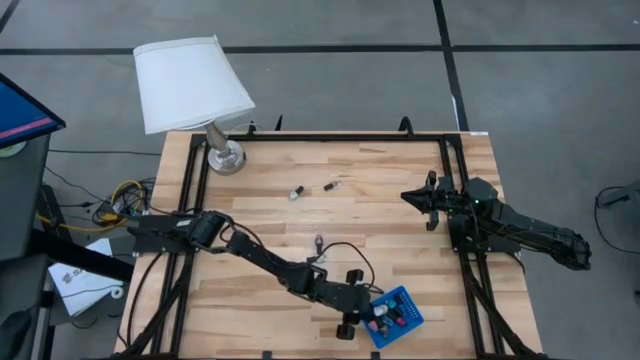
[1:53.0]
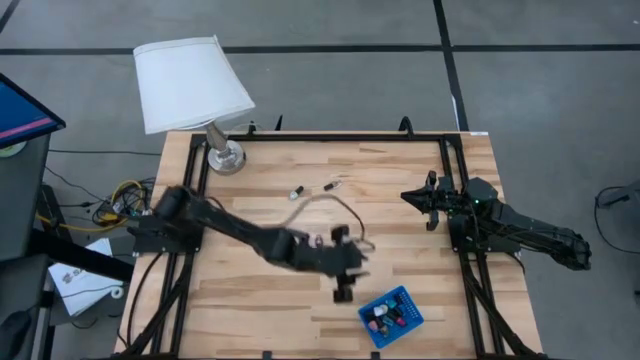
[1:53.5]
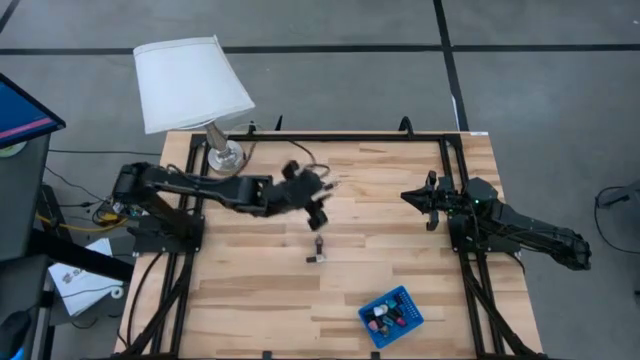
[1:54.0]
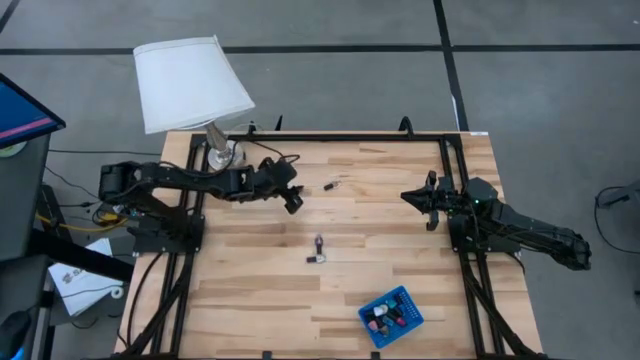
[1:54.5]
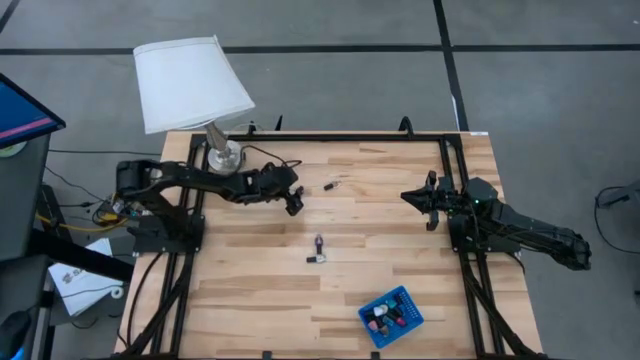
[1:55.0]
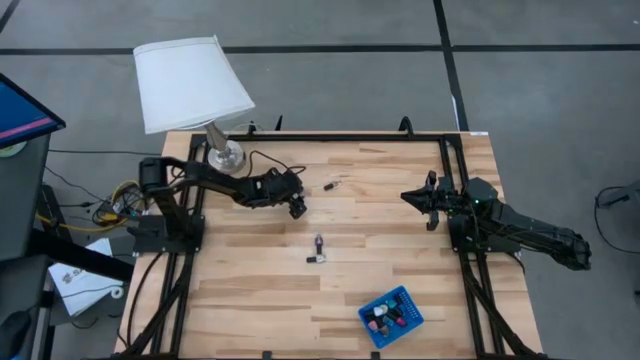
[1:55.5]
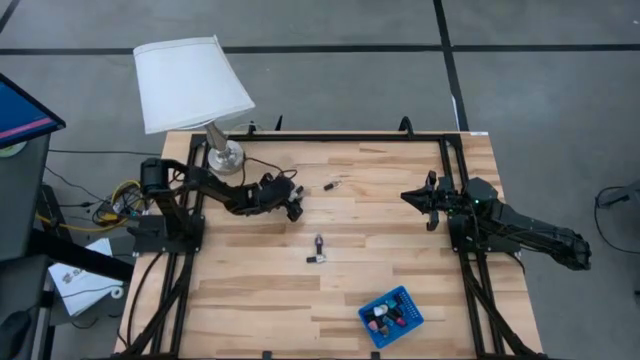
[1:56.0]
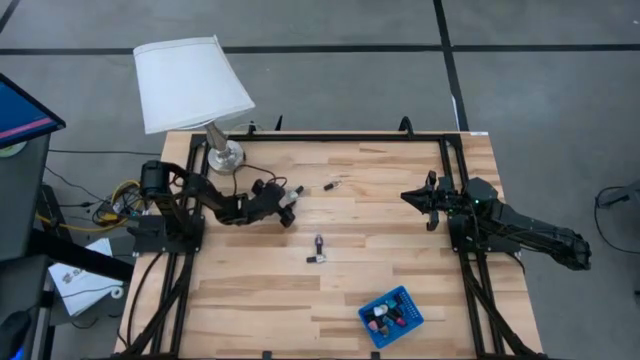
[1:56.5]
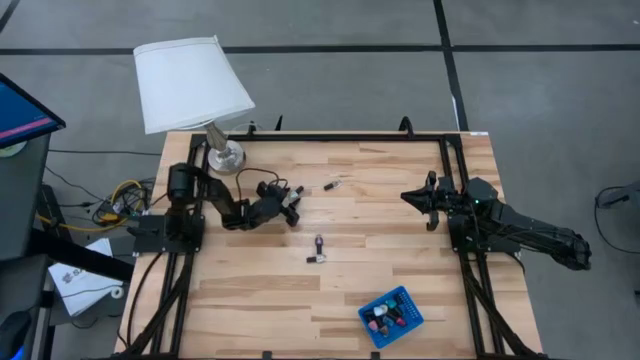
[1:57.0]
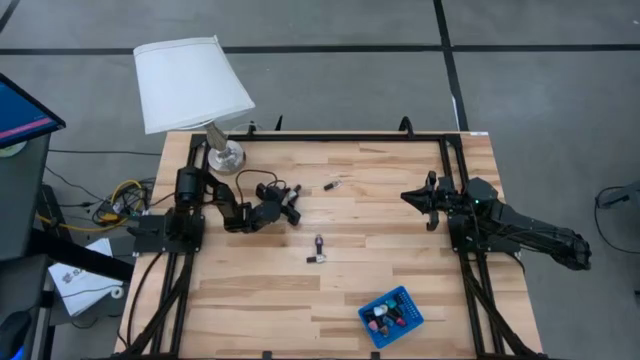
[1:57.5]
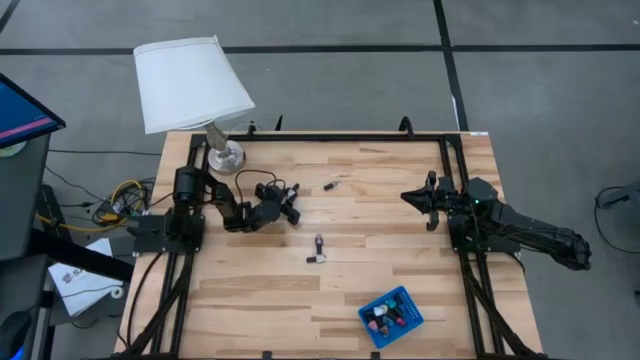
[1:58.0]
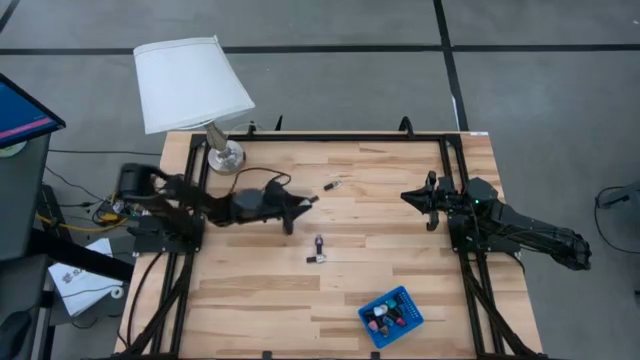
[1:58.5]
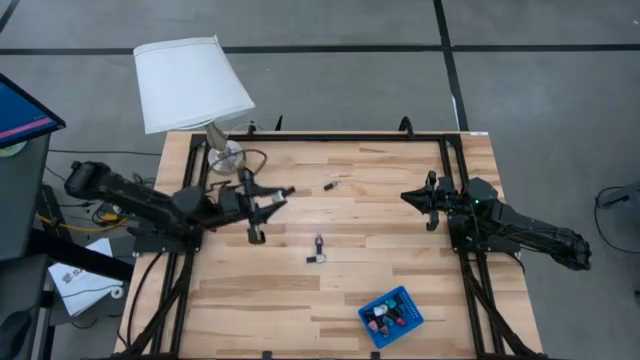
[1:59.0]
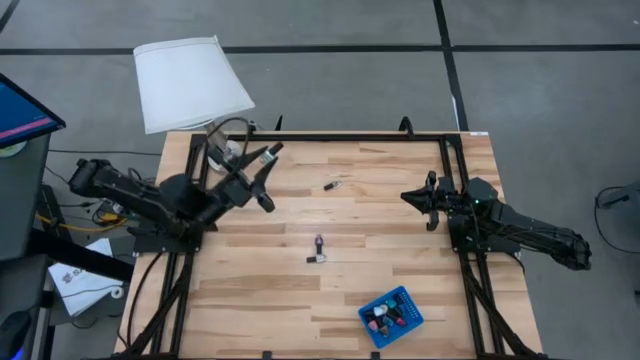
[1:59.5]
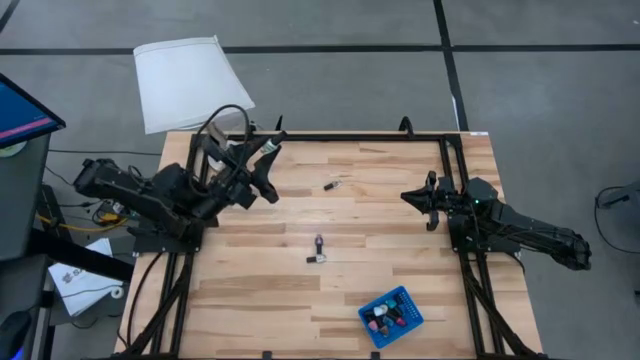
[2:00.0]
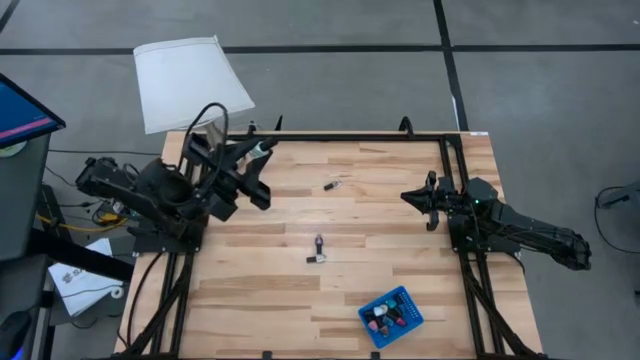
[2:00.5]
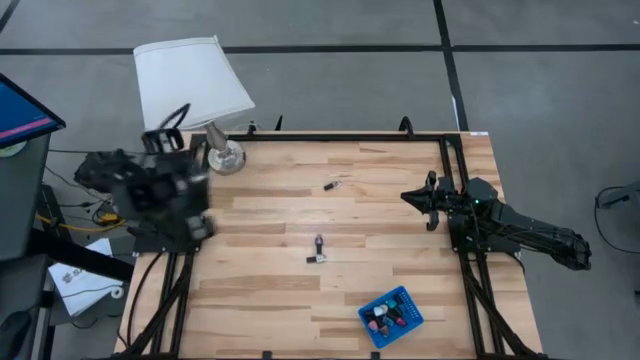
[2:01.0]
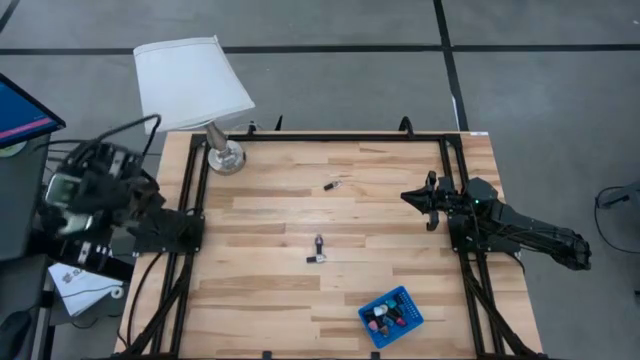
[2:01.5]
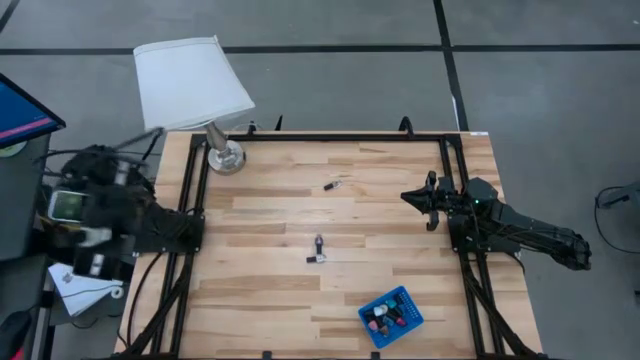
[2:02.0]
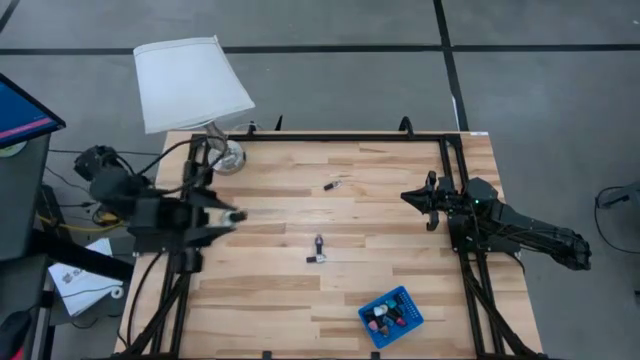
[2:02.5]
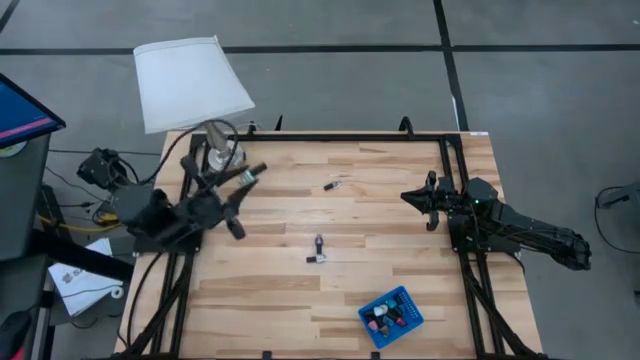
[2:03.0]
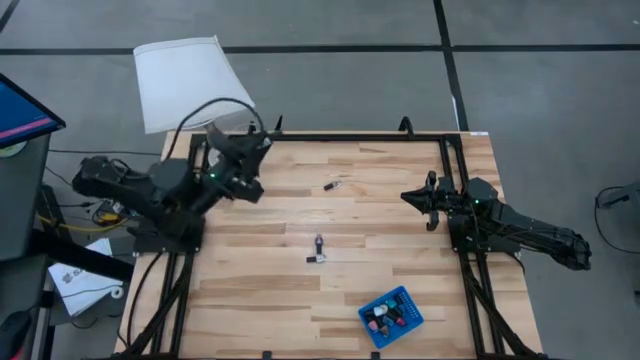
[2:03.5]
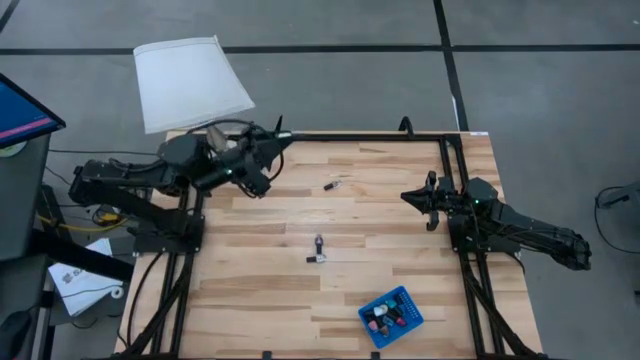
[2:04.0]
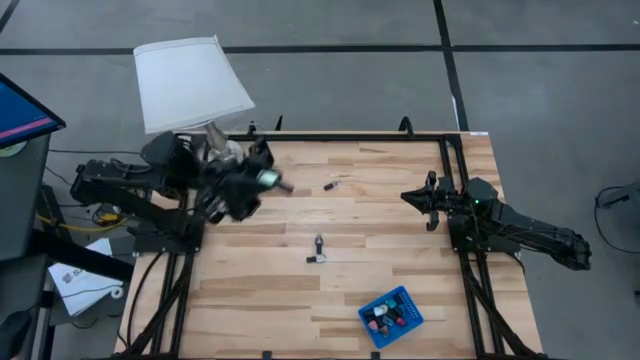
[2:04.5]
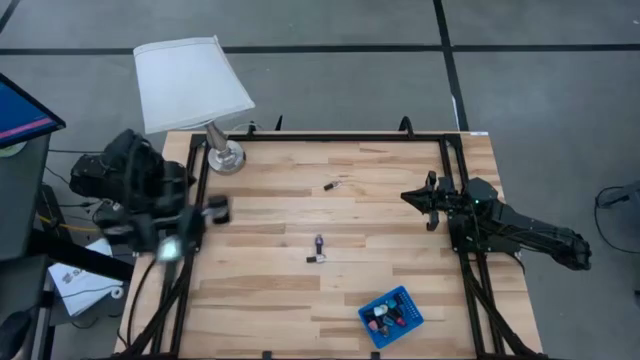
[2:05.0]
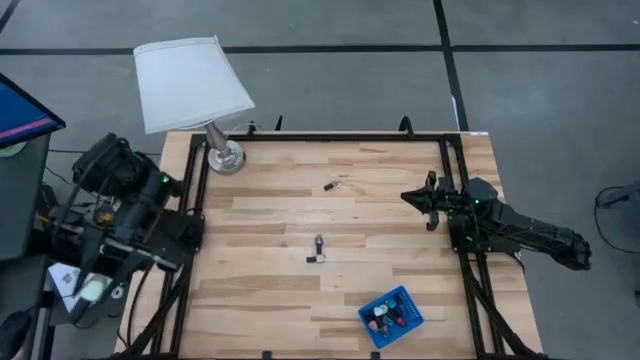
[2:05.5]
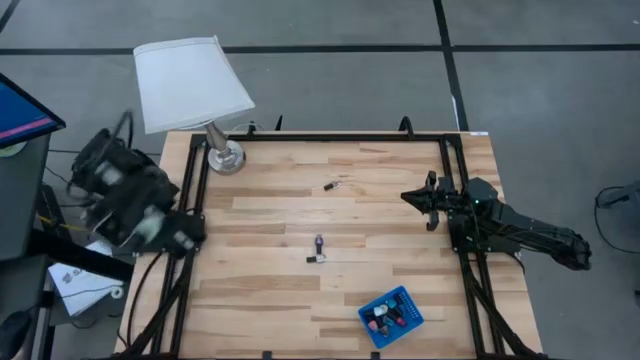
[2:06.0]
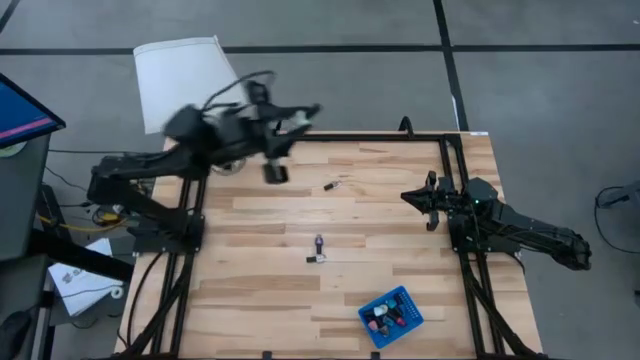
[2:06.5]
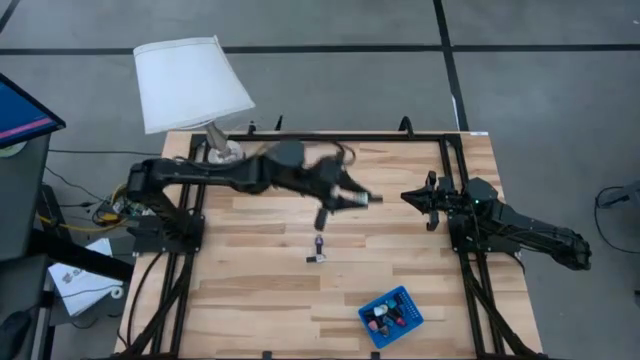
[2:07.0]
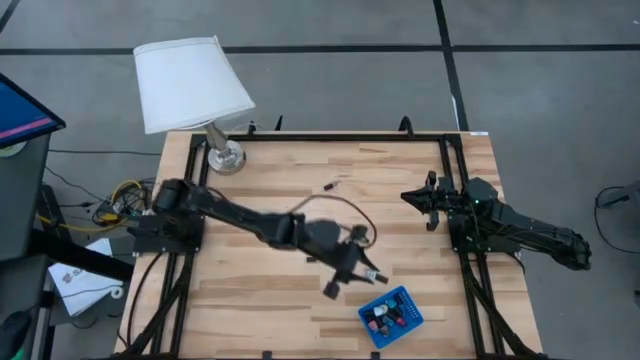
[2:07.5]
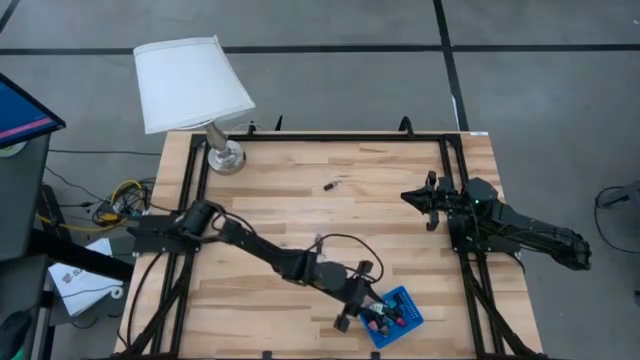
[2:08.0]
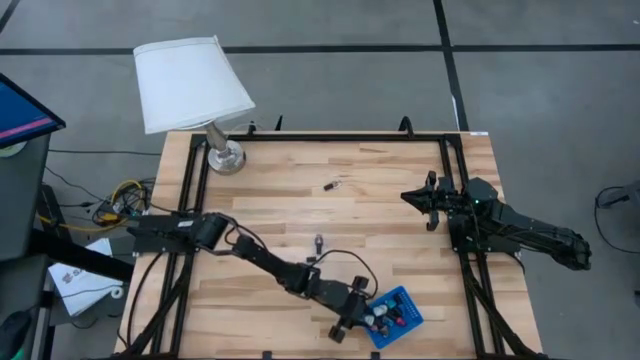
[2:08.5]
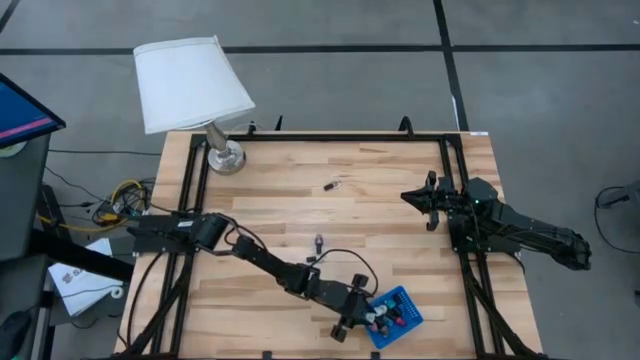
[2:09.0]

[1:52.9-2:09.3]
Task: Pick & Place Nail Polish
Put the gray nail polish into the blue bin

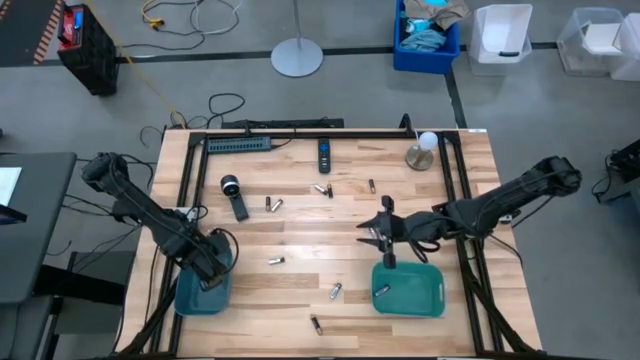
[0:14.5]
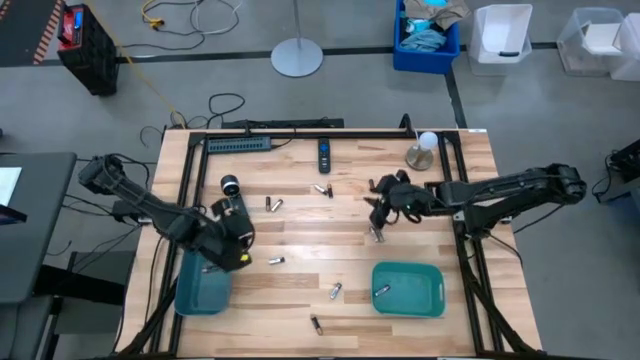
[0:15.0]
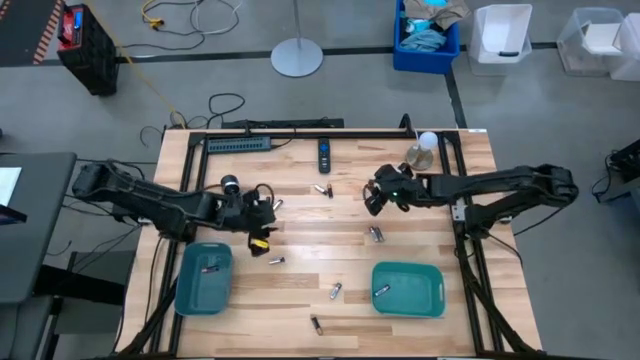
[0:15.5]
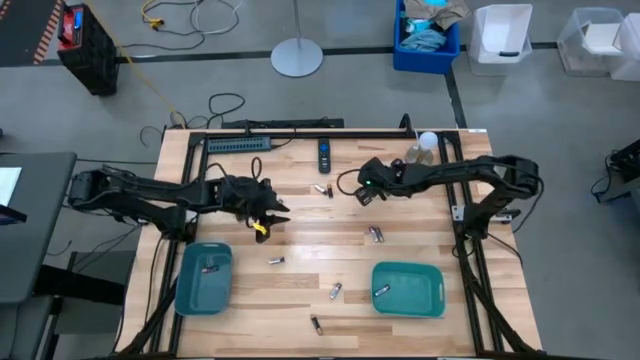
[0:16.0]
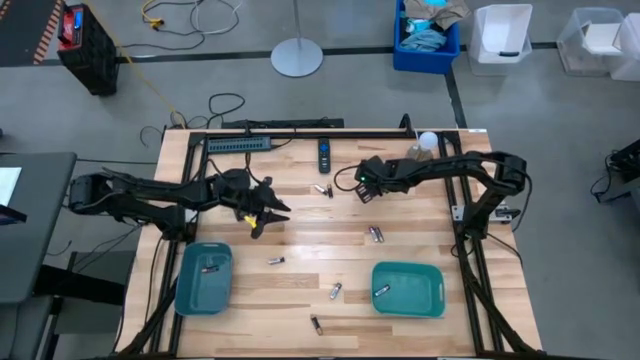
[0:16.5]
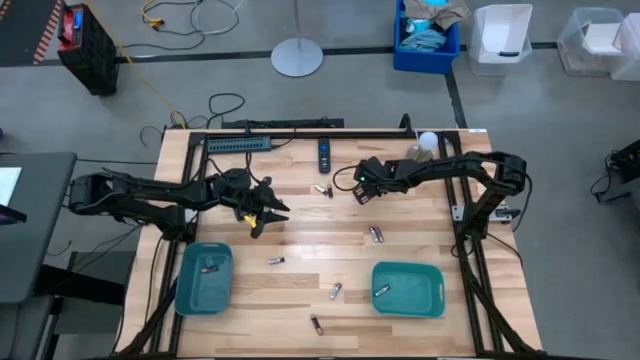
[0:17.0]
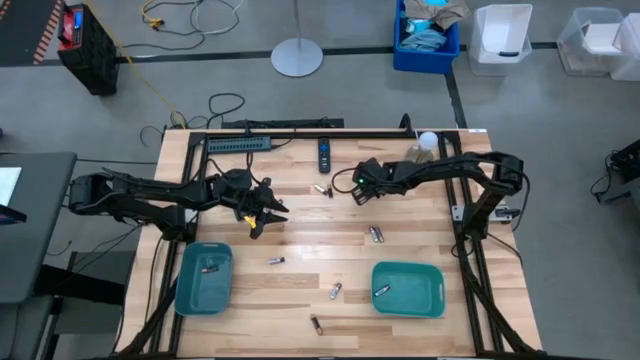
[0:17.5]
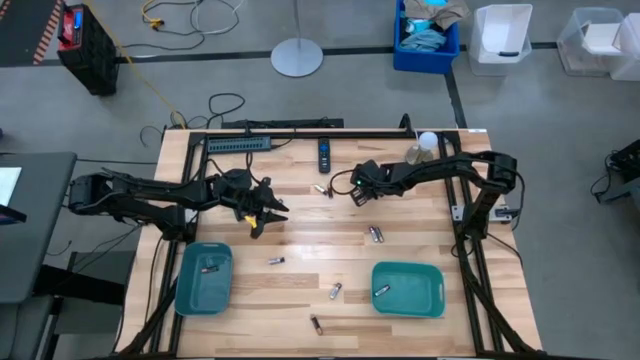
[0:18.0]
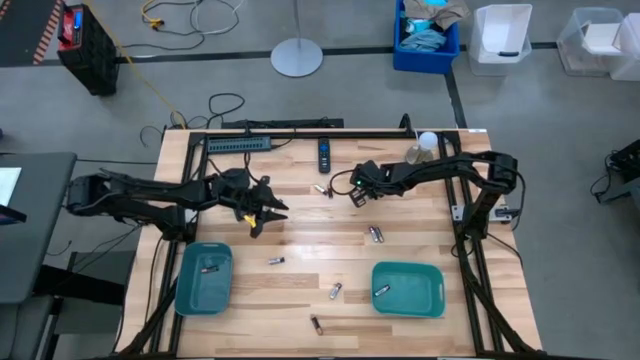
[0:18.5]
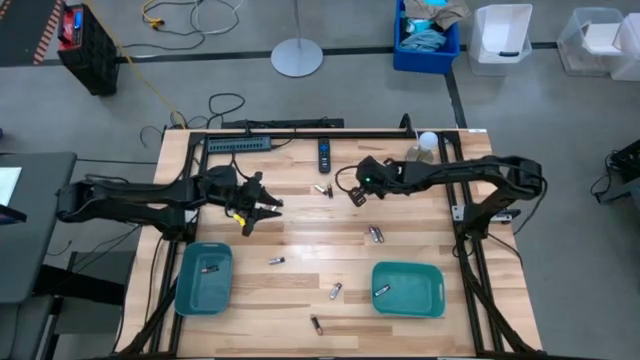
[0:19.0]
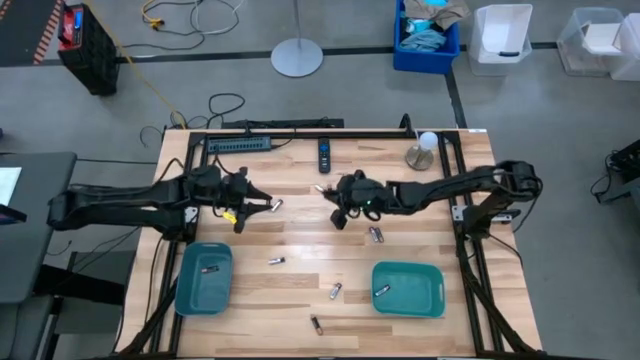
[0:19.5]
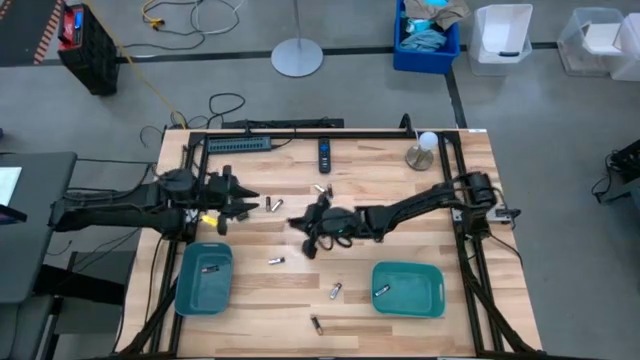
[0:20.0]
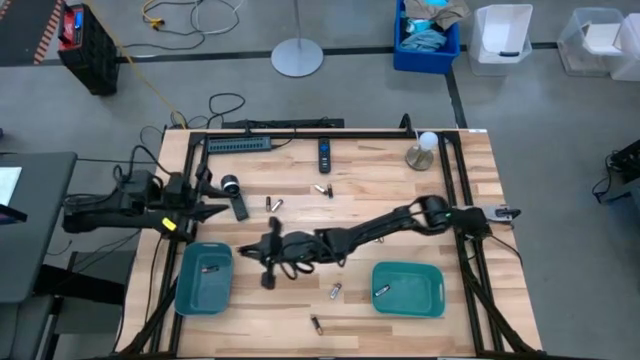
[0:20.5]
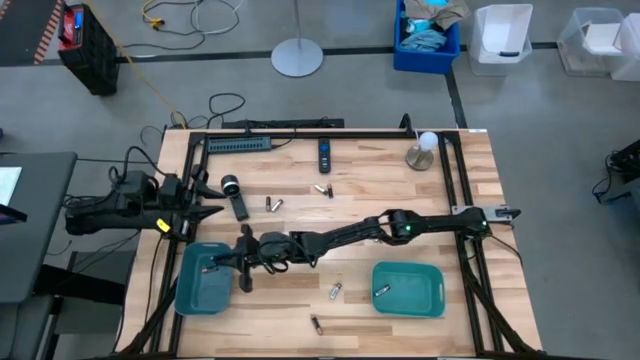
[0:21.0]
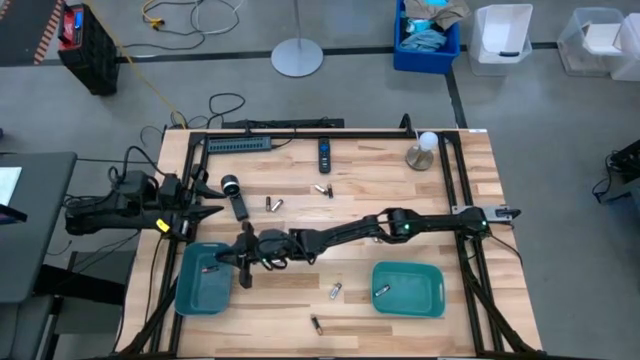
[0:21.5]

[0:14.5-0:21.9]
Task: Sort batteries
Put the black battery into the blue bin
